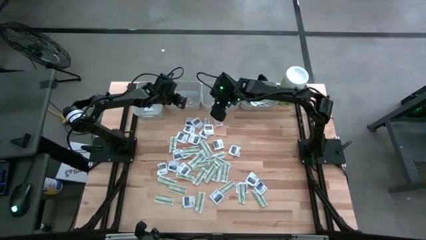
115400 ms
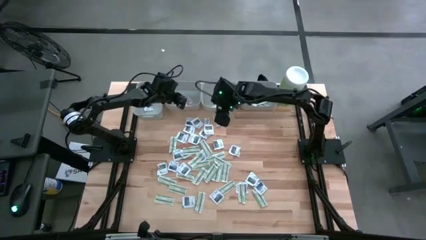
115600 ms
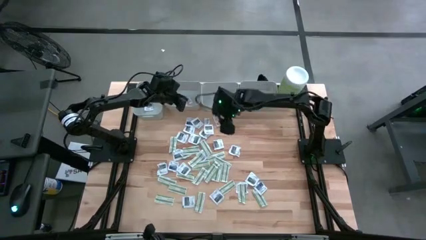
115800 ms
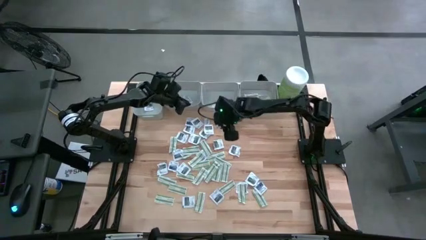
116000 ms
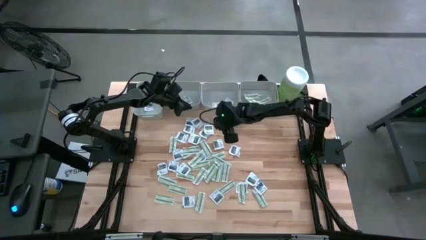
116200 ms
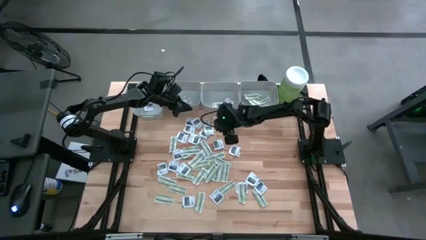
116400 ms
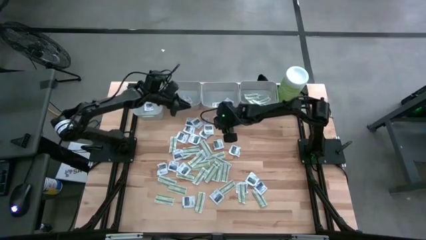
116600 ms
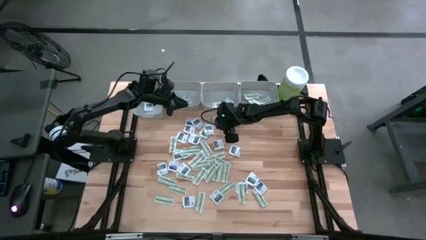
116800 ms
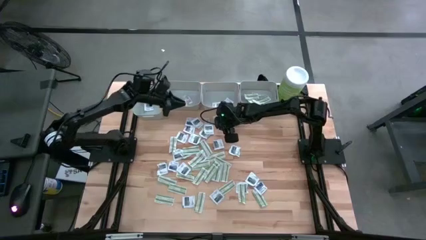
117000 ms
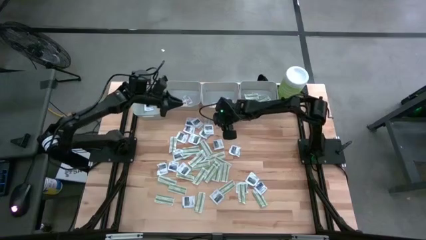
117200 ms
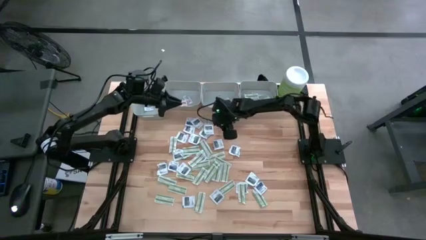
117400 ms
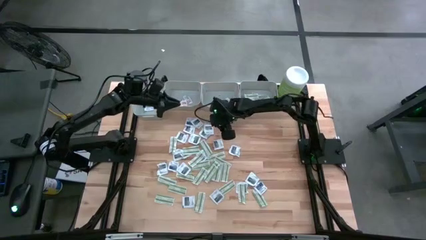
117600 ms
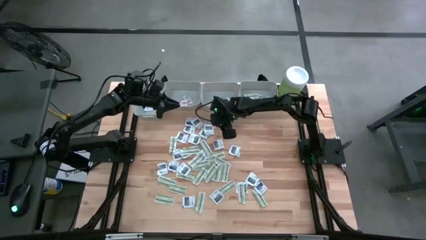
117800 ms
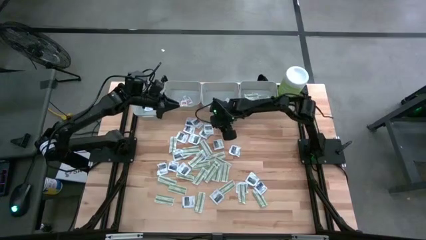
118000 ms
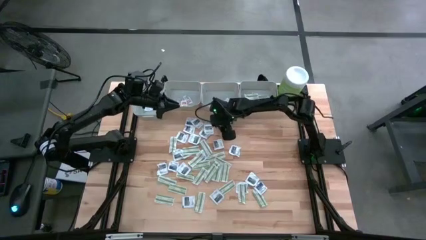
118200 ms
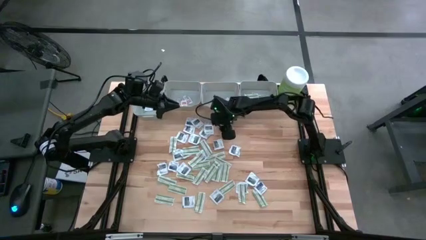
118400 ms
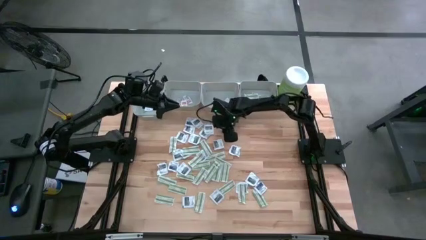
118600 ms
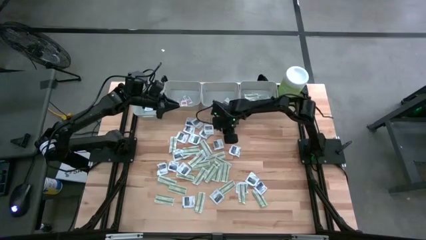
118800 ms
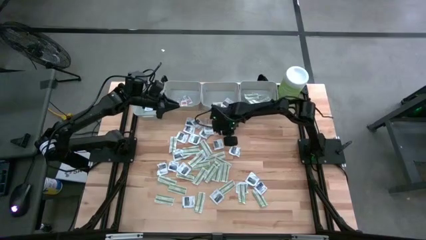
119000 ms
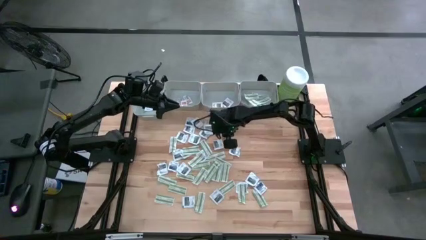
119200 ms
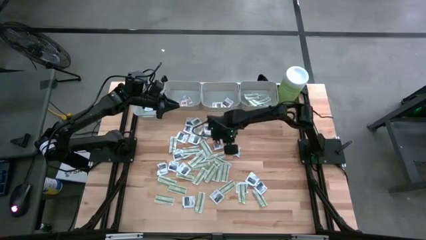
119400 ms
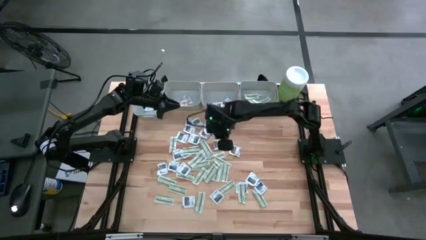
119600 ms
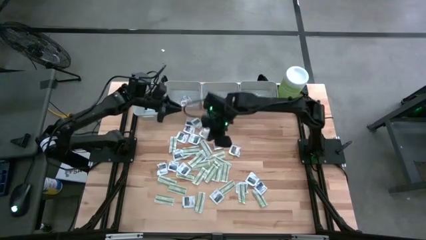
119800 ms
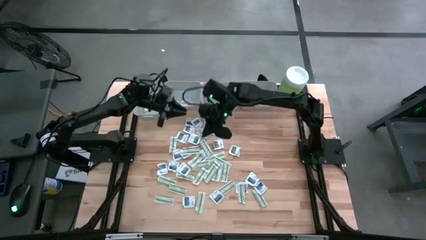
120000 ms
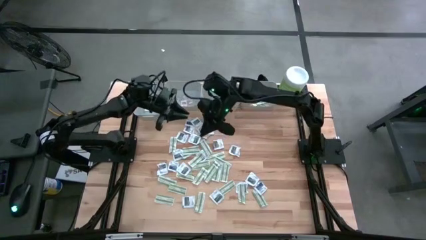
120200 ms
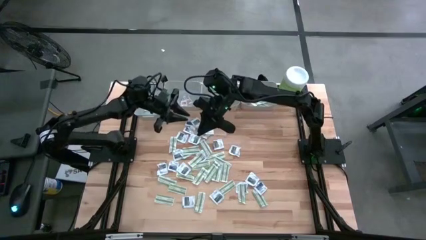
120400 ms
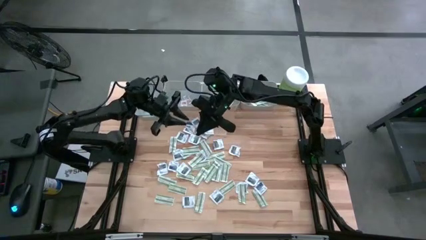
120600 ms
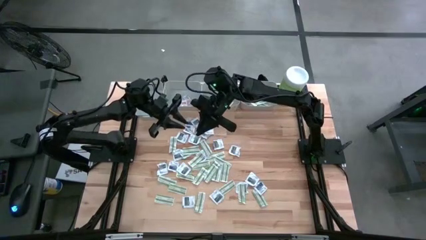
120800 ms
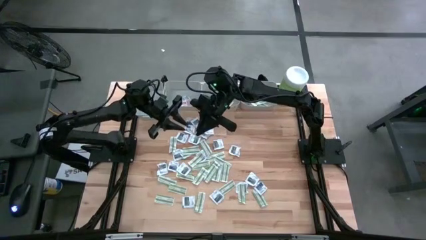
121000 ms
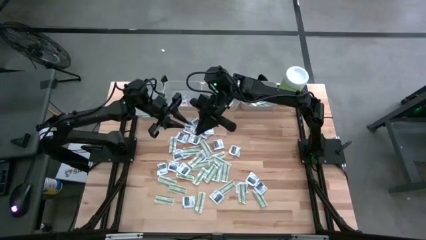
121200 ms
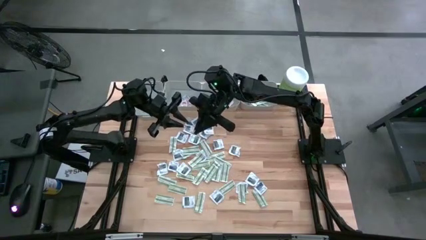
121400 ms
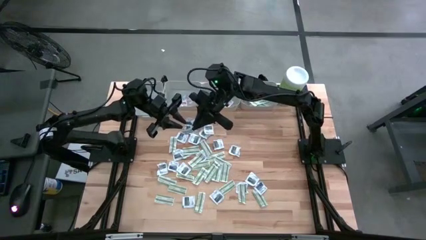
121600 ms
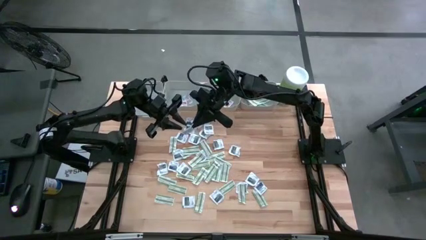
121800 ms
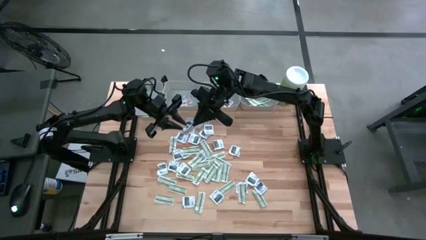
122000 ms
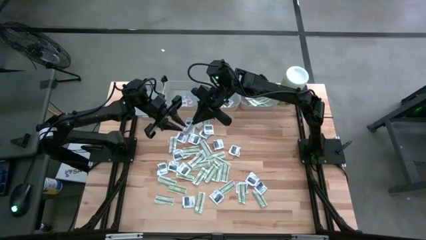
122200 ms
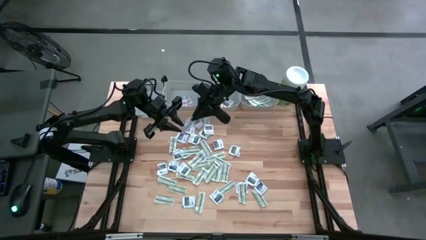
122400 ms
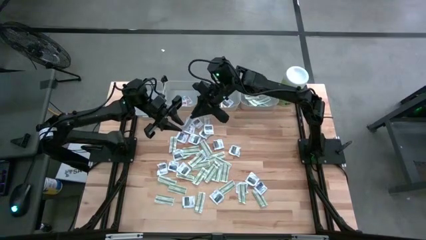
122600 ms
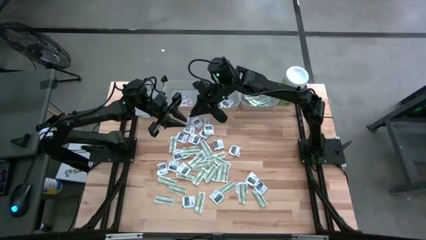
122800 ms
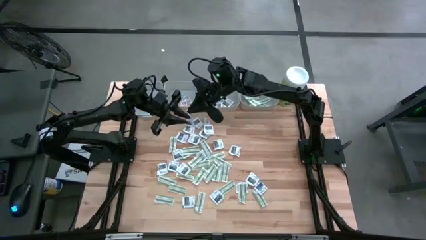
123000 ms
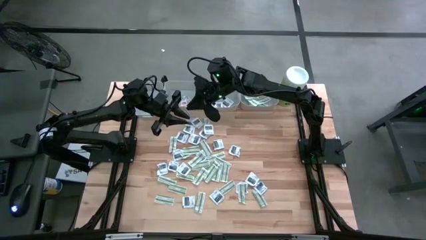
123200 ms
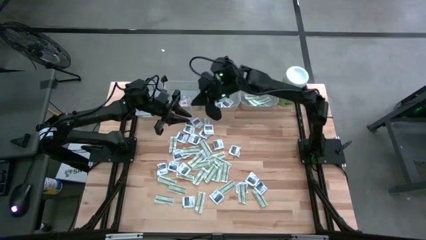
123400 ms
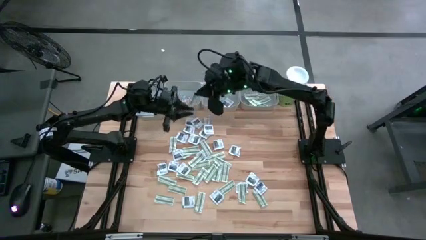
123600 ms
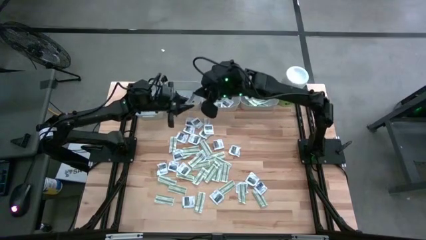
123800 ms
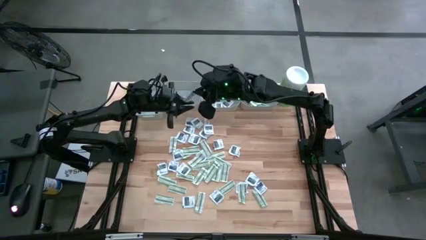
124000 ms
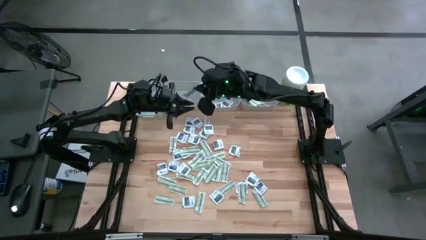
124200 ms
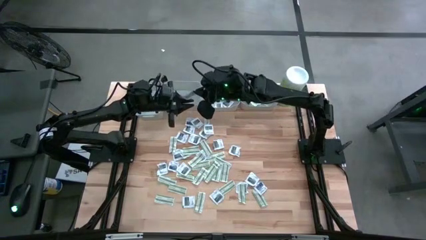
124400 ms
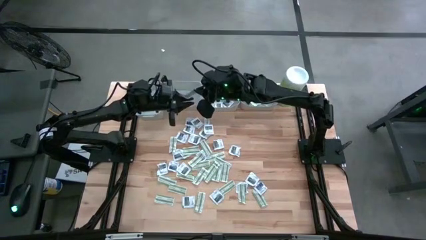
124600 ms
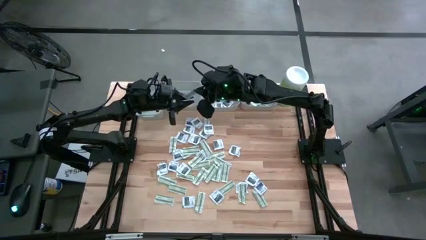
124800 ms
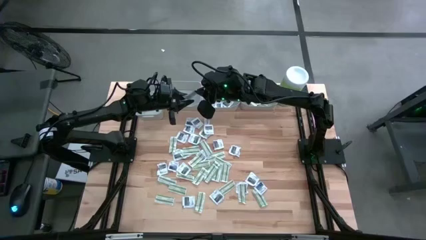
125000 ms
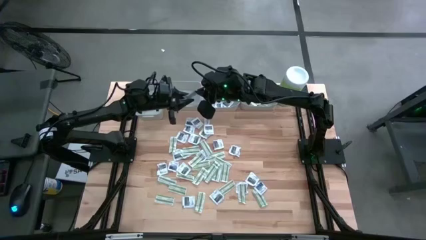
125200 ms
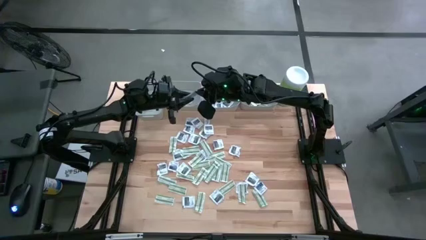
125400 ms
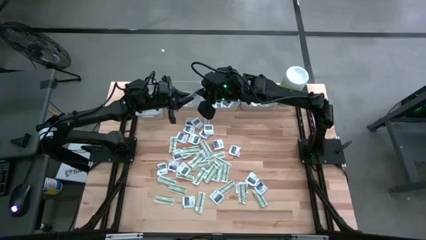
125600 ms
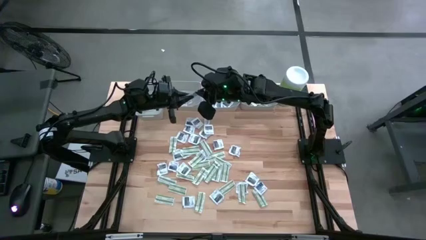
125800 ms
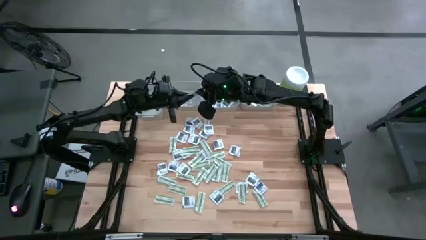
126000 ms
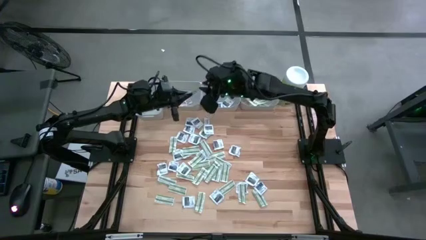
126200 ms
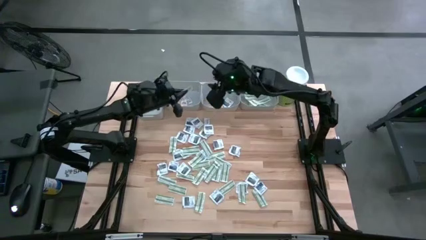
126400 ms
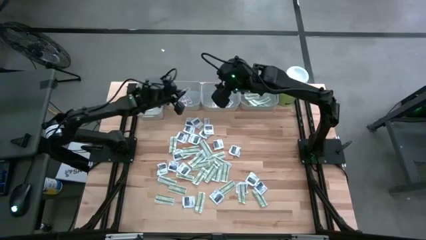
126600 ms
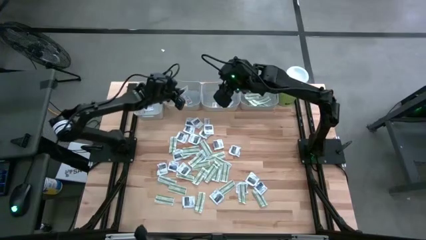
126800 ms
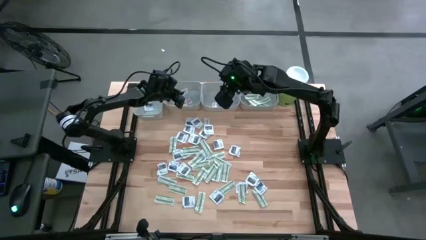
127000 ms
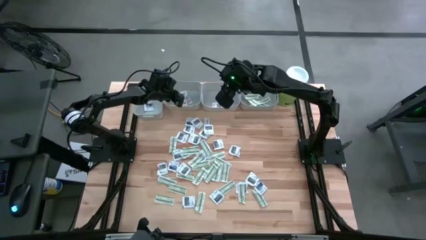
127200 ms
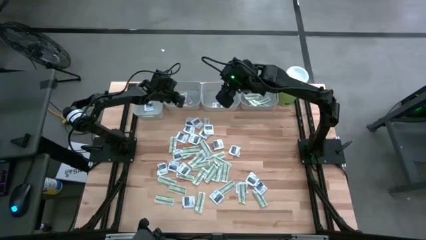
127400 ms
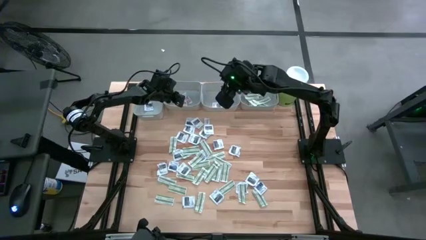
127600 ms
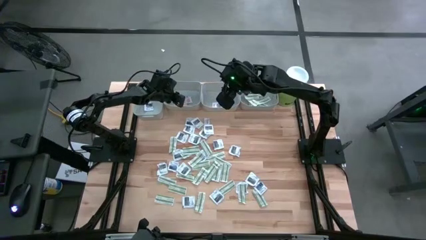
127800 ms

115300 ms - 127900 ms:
Task: Pick & Place First Aid Supplies
Put the orange ointment pack into the middle left gray bin

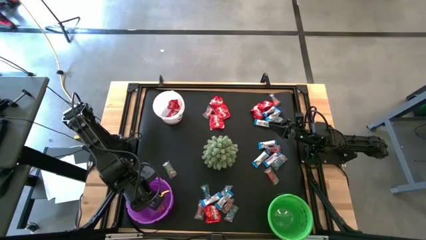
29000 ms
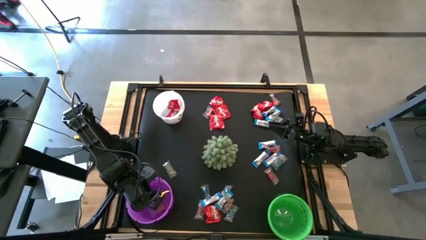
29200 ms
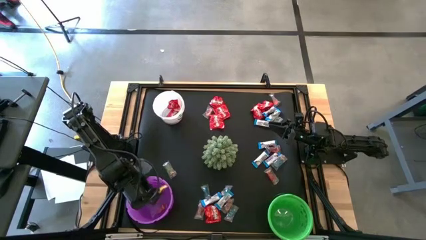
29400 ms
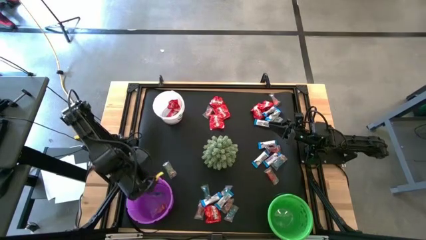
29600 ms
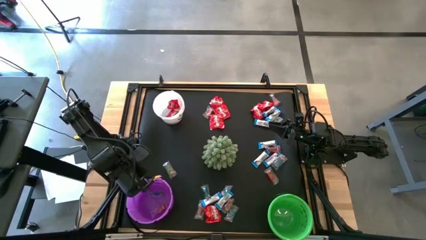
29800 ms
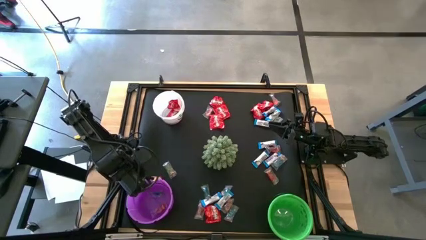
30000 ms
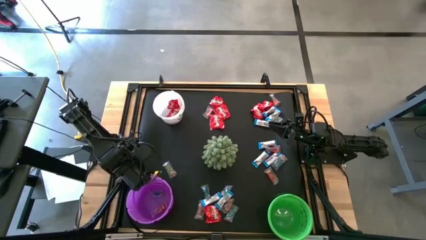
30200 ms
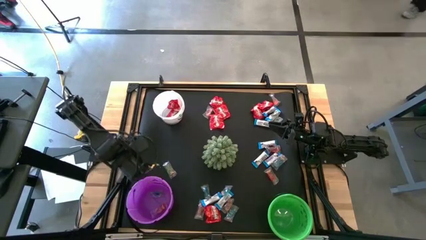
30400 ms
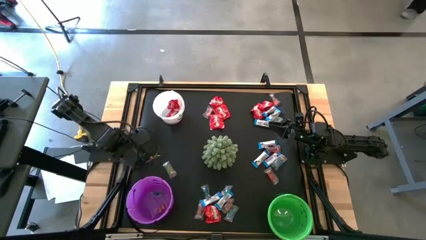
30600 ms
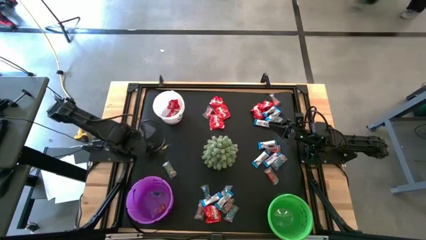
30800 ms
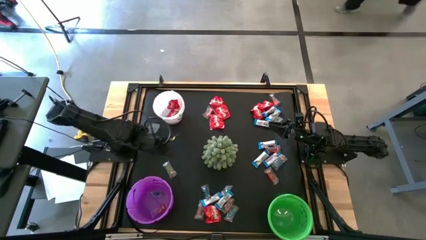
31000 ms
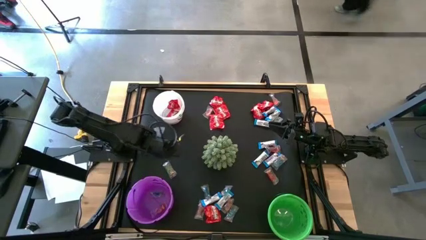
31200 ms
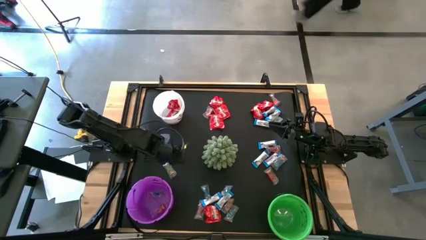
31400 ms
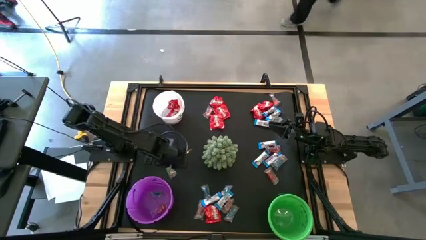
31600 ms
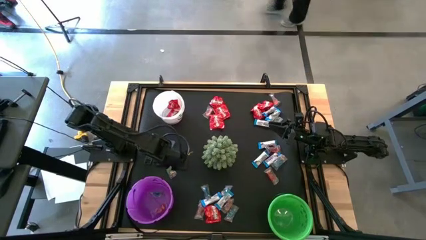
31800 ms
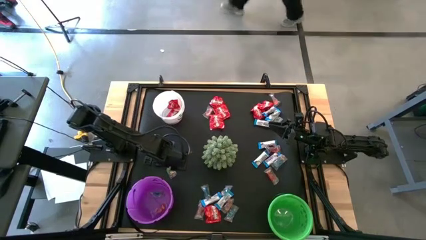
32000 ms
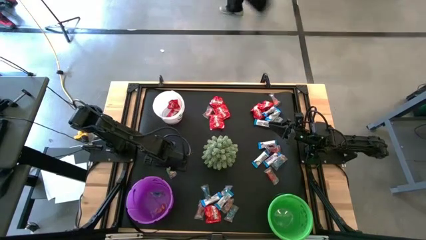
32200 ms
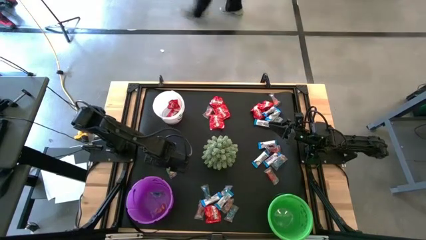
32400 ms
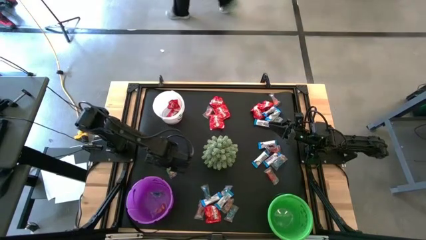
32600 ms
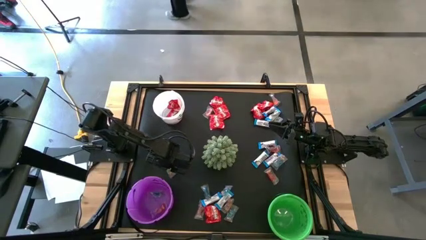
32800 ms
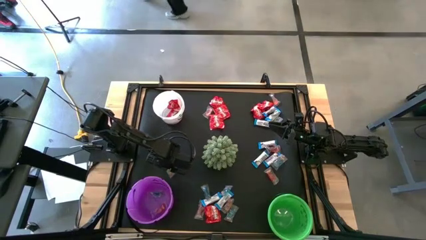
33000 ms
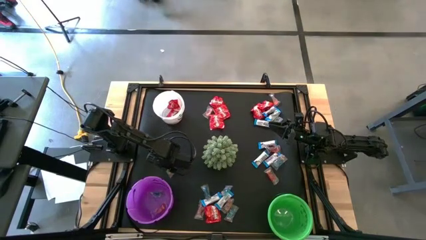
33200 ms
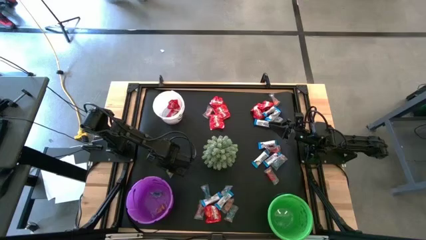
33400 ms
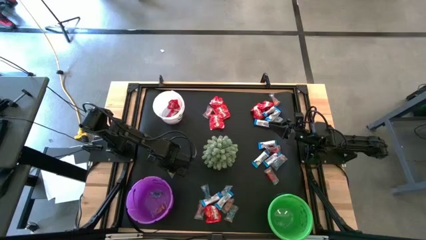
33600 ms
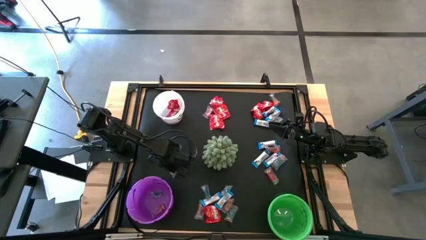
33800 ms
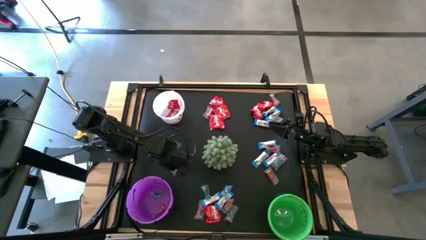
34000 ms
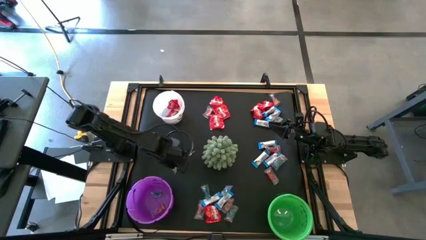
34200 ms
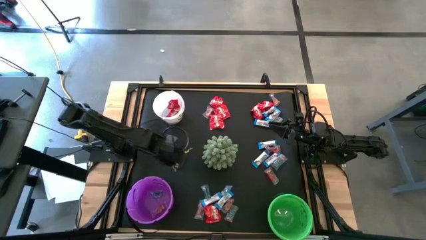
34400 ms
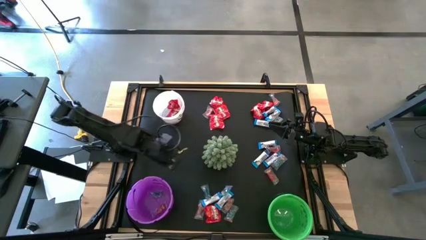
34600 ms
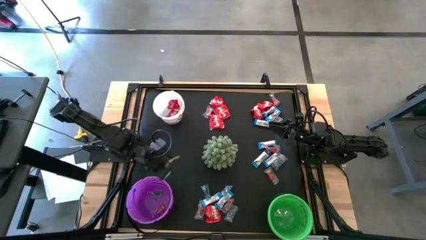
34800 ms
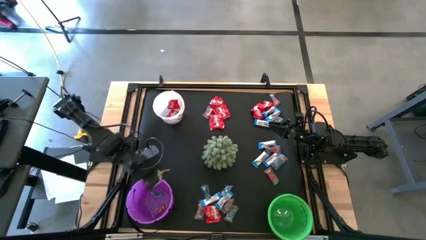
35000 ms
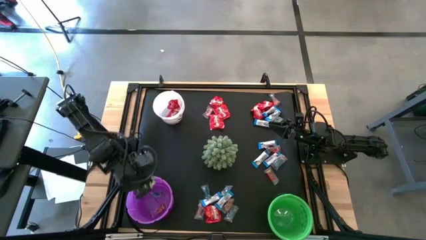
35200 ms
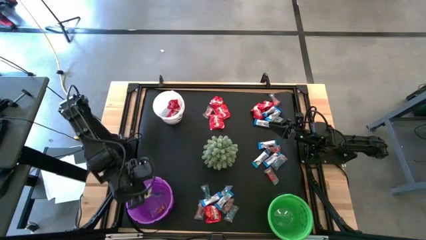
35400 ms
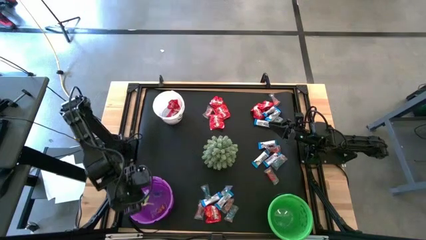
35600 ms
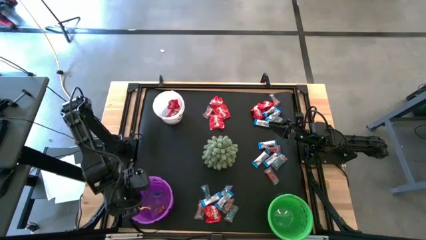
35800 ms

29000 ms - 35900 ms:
Task: Organize candy in baskets
Put the green gummy into the purple bucket
